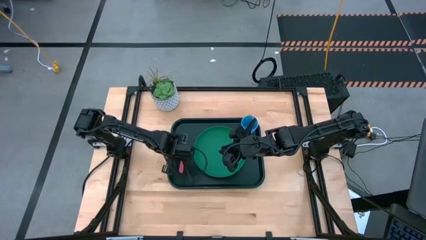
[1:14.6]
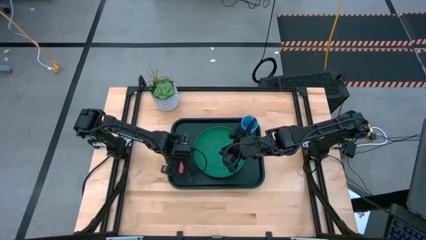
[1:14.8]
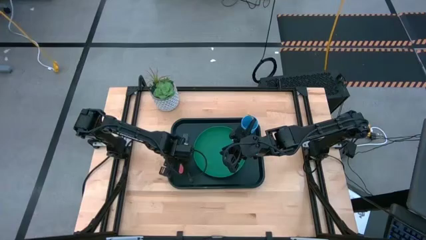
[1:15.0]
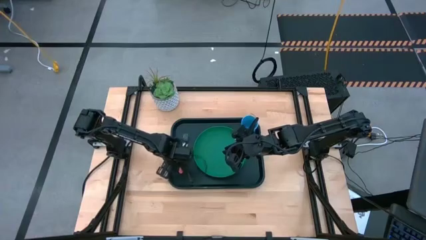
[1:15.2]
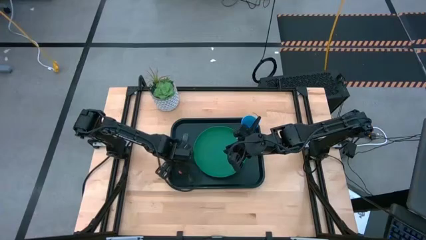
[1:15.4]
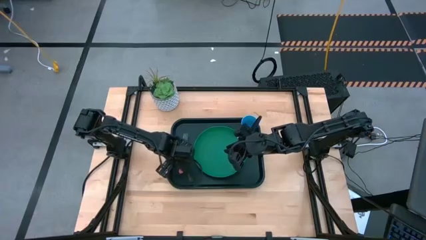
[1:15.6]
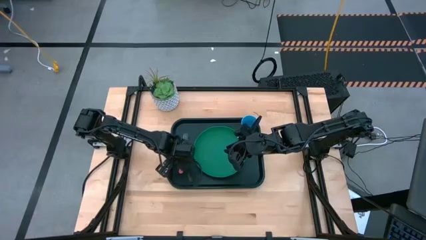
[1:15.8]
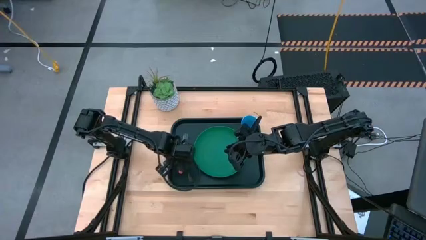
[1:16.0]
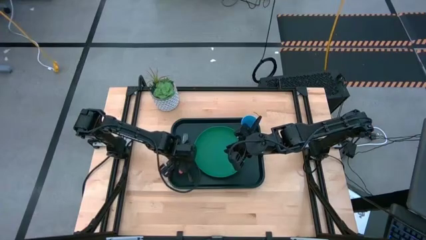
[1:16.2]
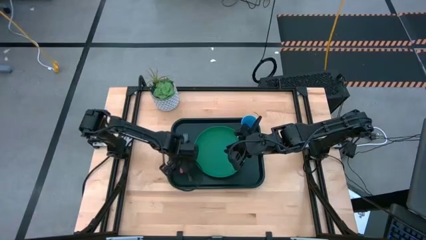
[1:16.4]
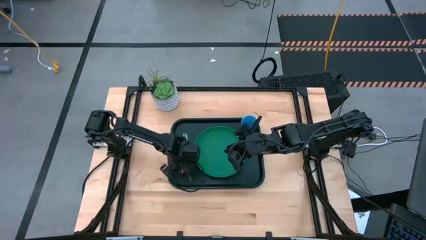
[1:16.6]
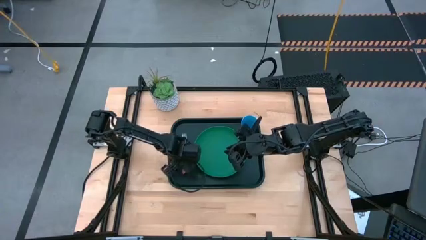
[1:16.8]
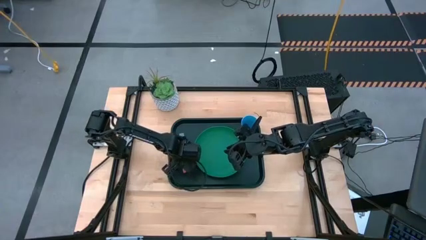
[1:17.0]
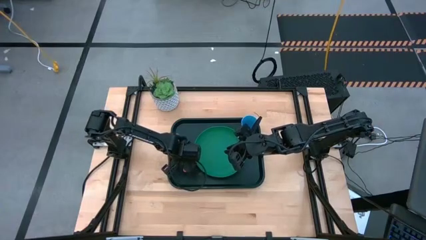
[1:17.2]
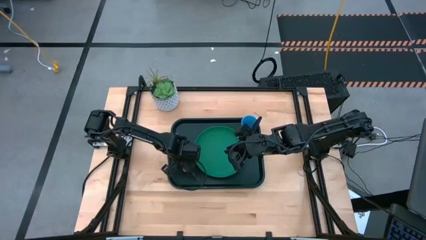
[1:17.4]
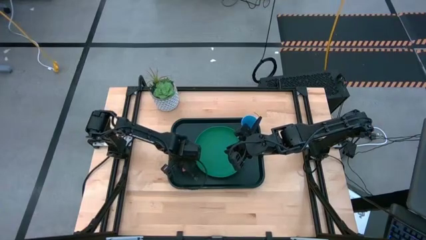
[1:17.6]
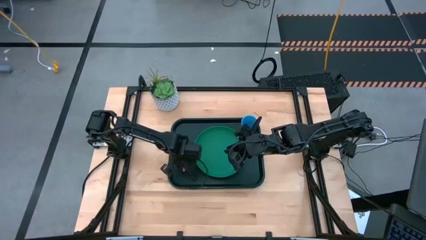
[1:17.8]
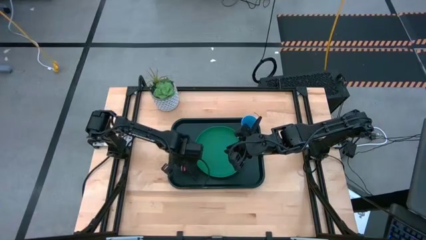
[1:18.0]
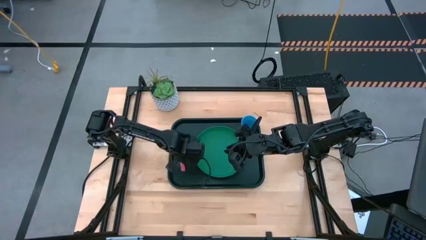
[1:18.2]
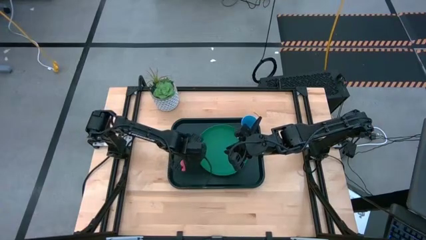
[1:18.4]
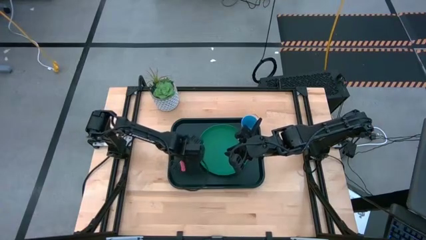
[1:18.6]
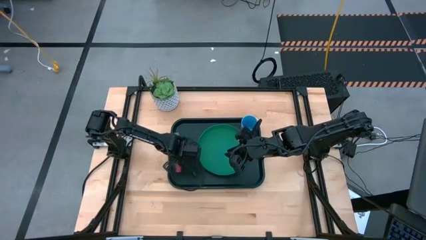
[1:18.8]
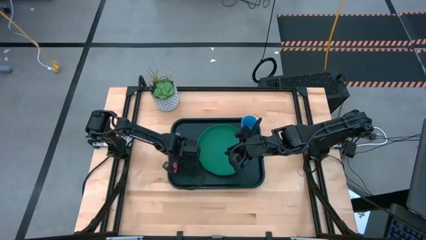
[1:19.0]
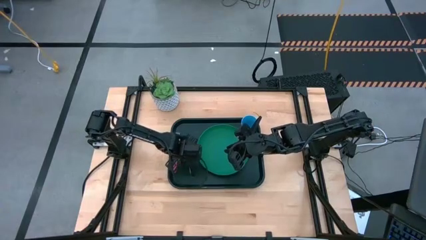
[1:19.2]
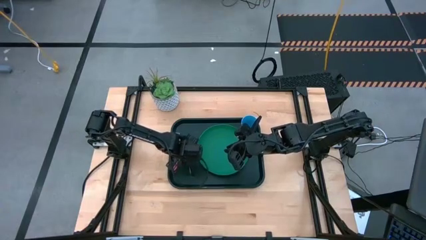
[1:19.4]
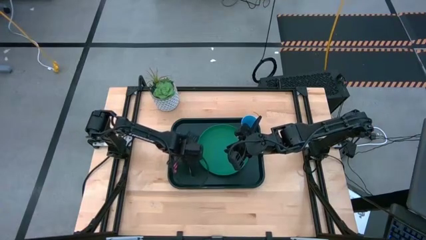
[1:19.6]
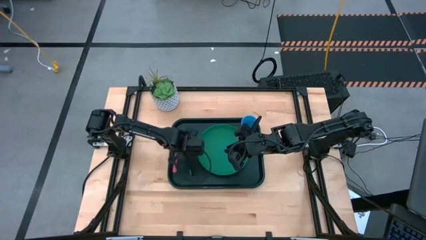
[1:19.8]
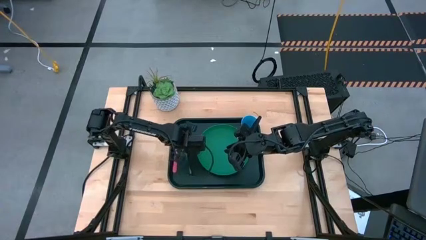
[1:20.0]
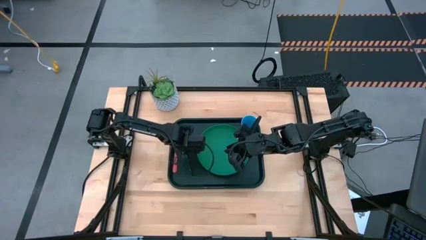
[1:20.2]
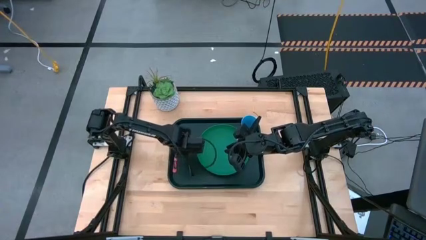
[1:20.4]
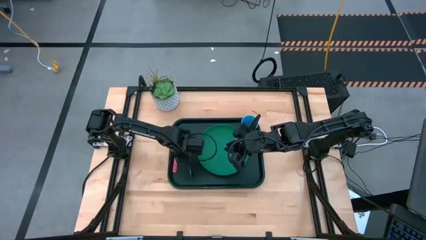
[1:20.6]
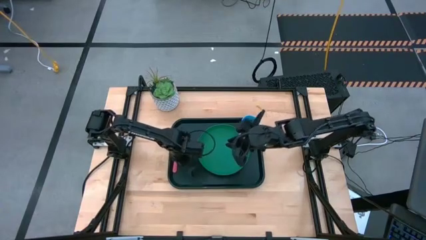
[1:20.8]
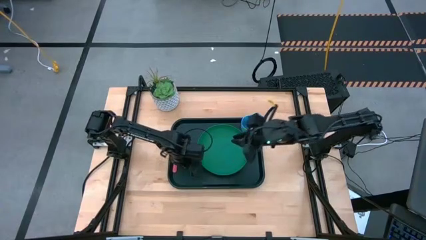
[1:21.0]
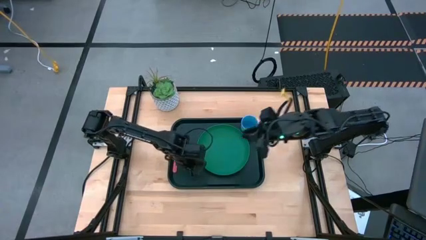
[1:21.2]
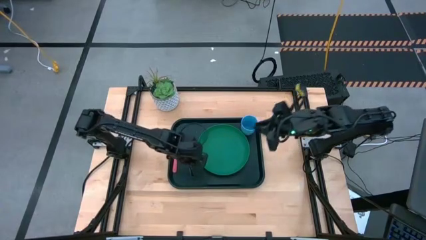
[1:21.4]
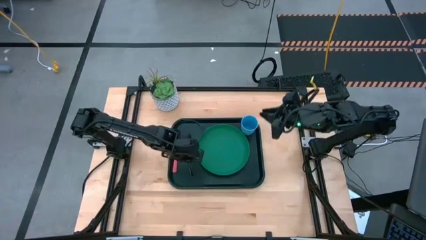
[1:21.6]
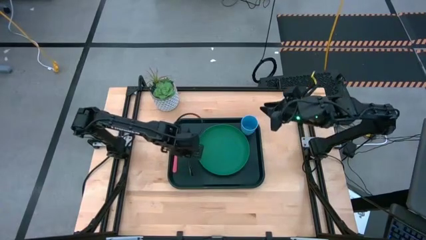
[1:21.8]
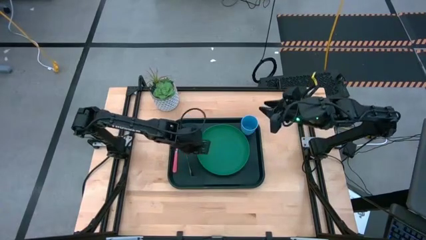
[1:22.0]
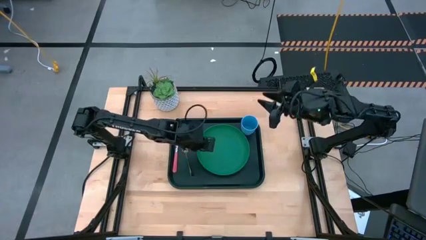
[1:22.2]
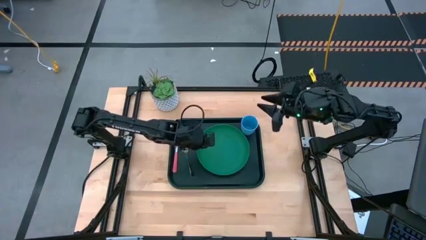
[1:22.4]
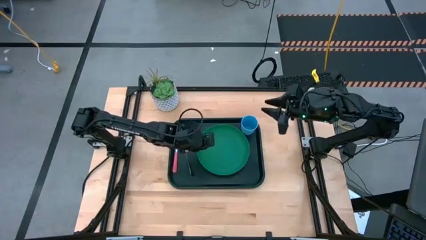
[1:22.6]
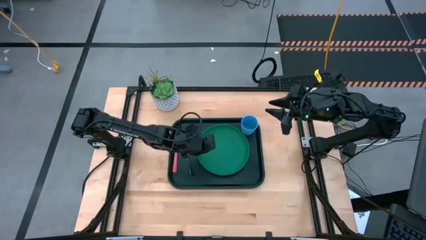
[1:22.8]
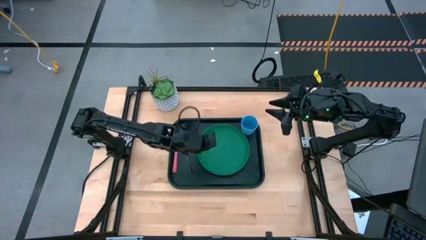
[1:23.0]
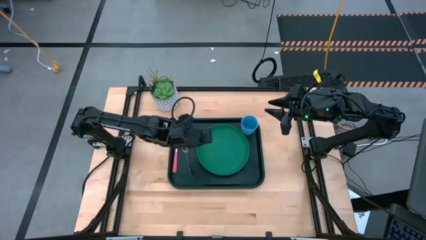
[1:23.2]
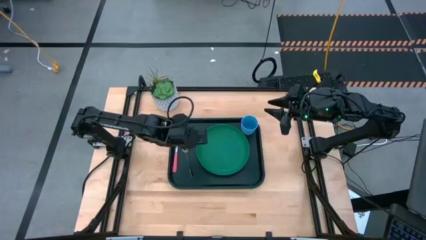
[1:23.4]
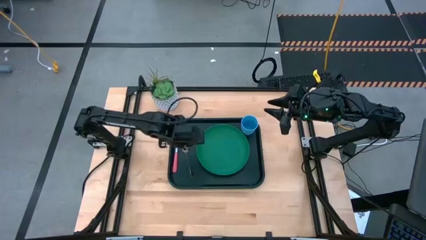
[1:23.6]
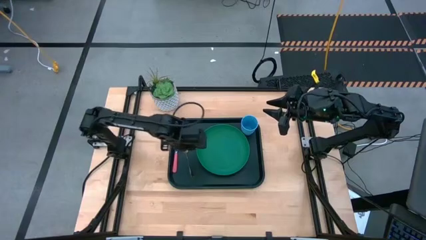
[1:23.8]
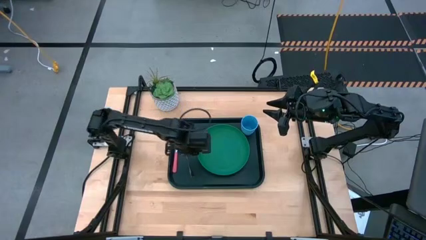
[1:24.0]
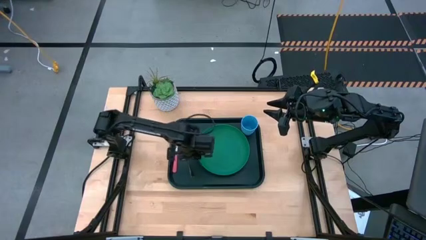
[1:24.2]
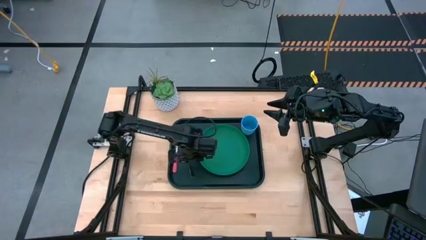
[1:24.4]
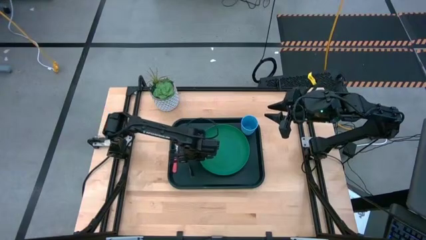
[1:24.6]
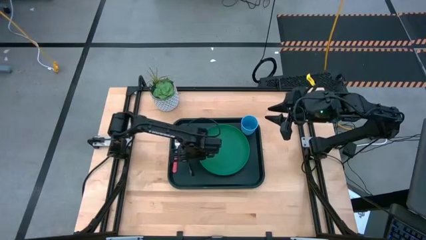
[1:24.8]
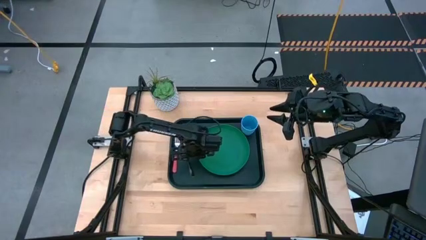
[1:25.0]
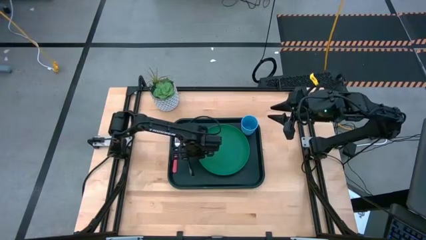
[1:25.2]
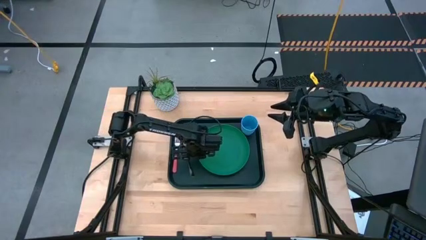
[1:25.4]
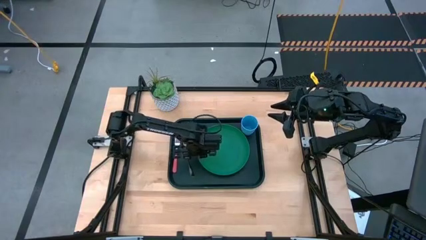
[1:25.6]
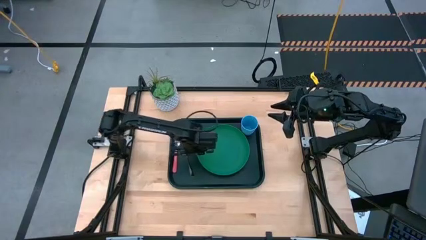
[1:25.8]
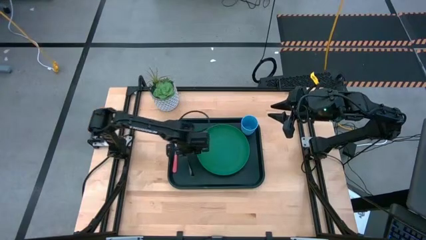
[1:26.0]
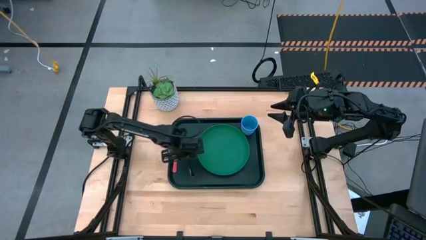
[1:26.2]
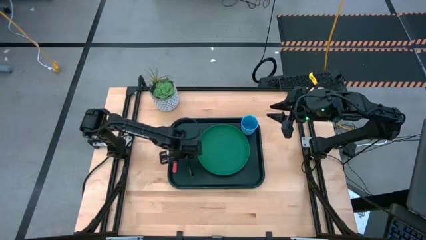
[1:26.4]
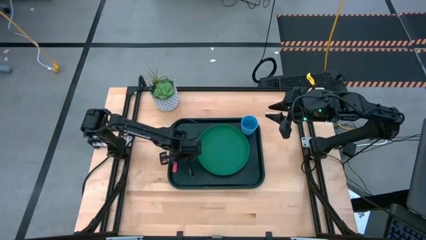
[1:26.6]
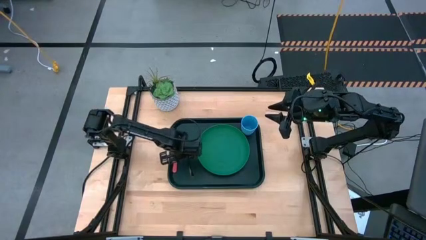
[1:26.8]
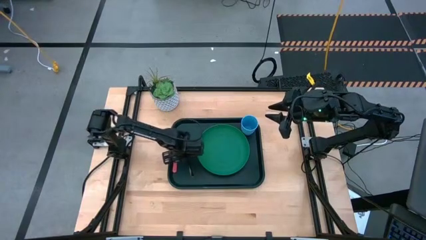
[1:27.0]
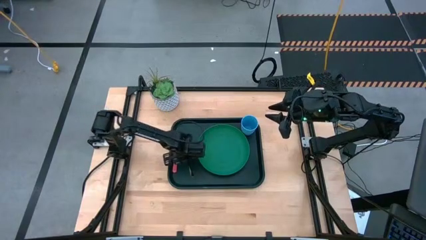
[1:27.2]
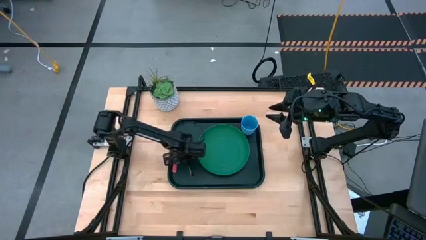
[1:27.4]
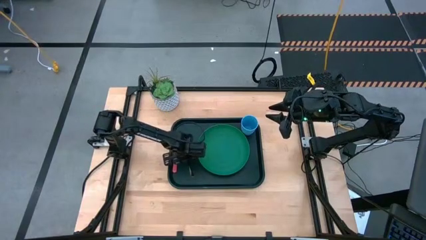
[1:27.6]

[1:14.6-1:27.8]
Task: Pick and place plate/cup/fork/spoon on tray
Put the black spoon on the dark green serving tray to the right of the pink fork
